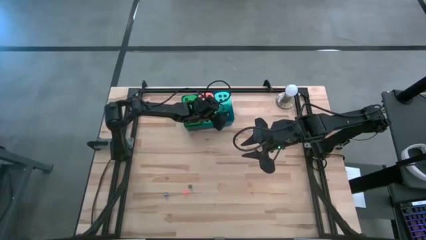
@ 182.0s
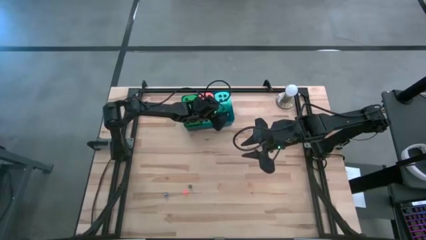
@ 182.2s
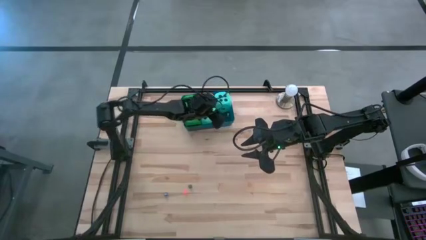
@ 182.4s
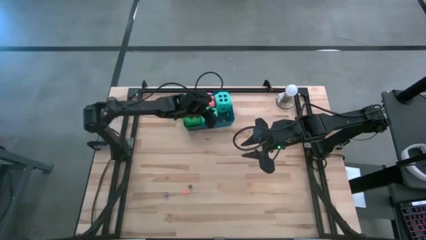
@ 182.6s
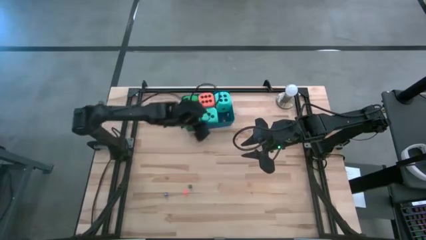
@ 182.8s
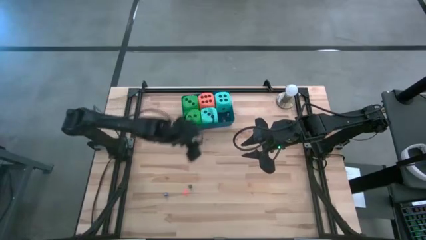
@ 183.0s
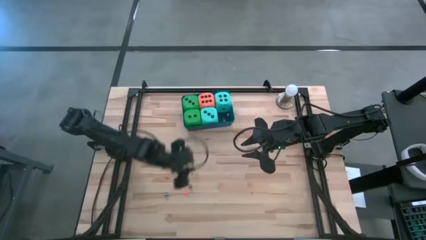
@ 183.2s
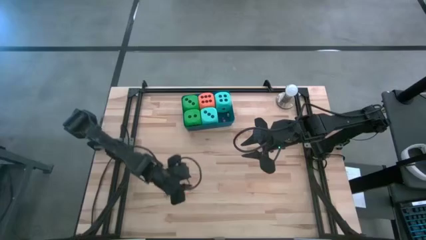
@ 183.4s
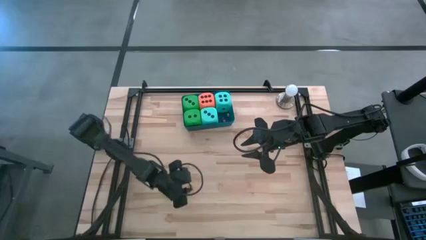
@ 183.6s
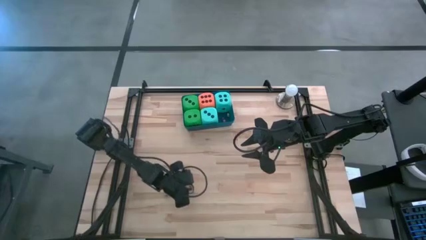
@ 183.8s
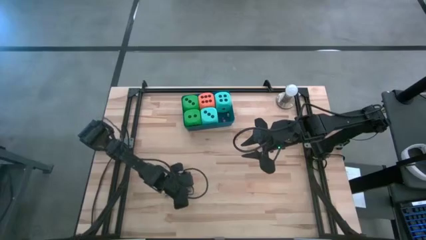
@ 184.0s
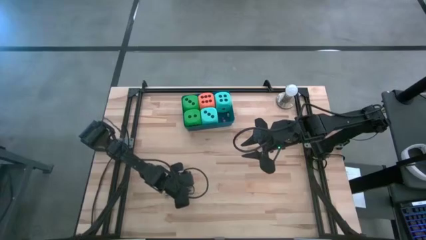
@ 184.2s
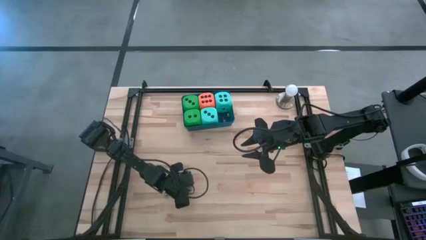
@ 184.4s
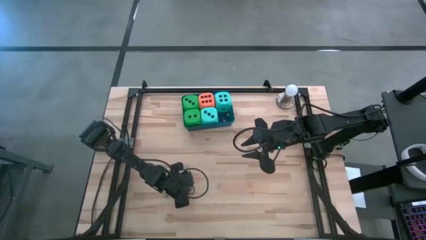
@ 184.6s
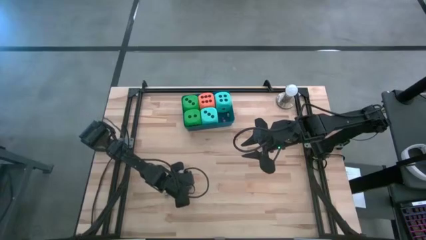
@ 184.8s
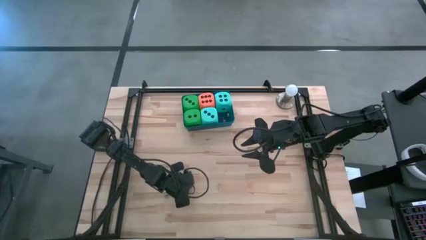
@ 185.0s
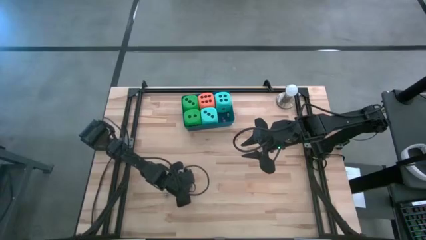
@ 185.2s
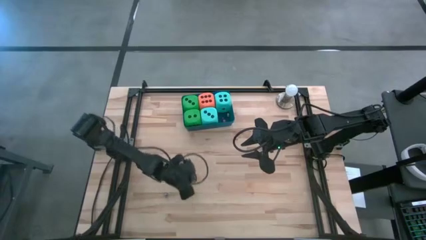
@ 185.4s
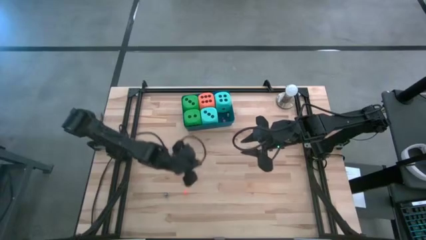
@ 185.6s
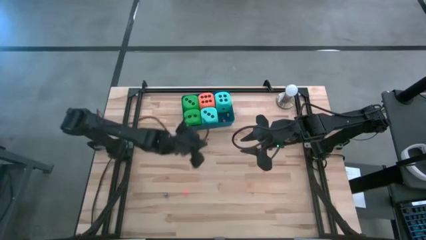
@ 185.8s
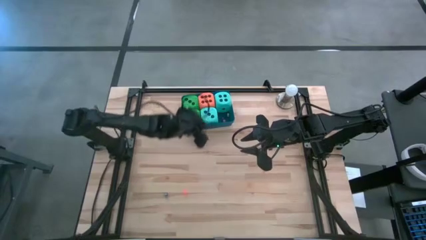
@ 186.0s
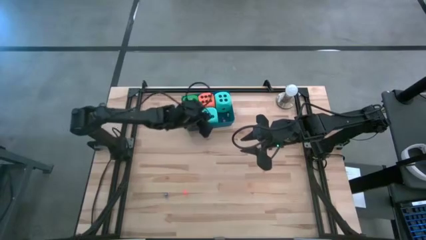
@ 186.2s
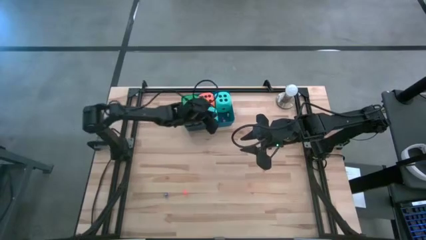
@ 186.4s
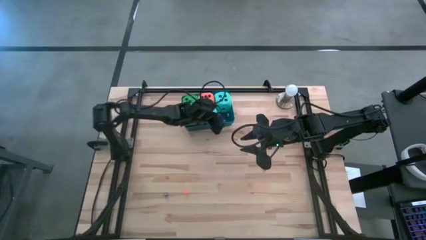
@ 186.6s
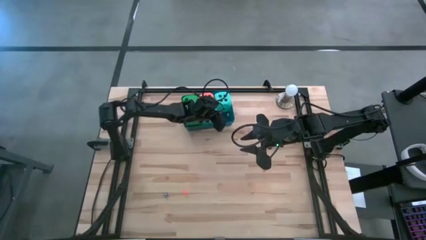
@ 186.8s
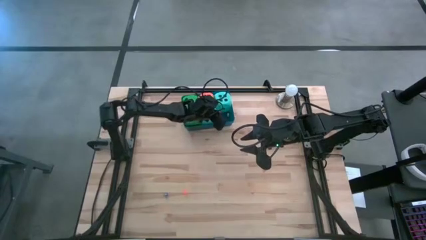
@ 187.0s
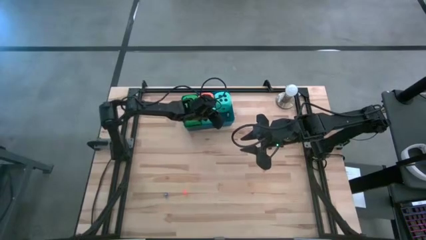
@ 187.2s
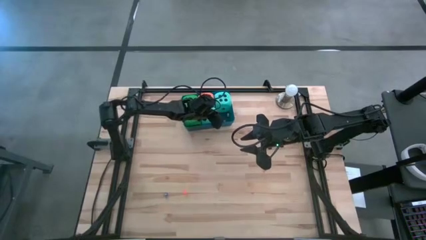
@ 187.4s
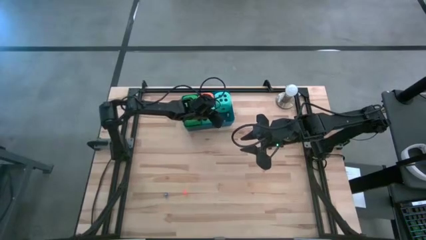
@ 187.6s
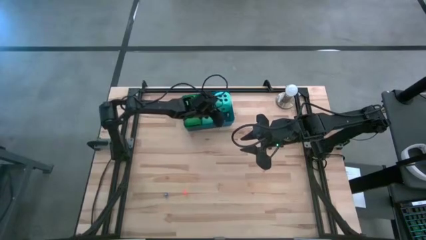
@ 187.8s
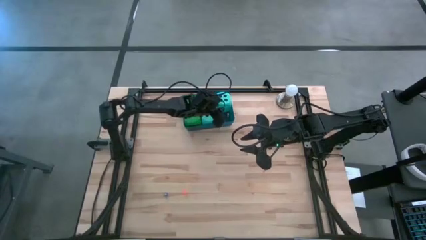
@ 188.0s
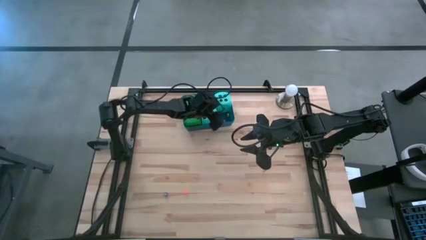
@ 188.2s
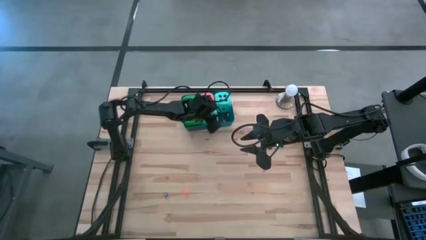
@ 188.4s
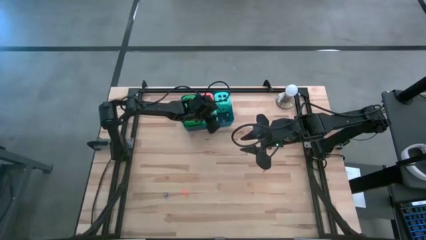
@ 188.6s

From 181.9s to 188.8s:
Task: Pick & Place Dice
Put the small black dice into the blue bin

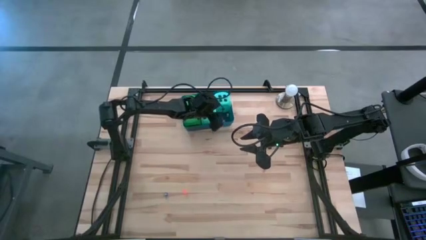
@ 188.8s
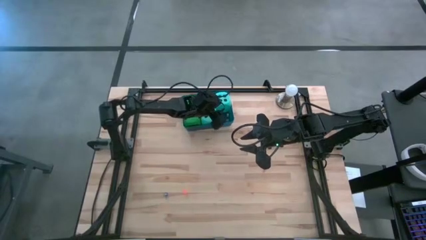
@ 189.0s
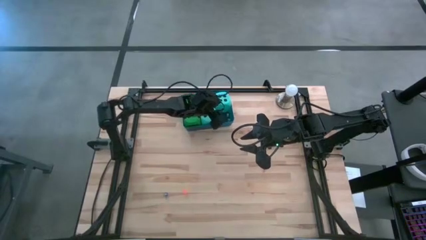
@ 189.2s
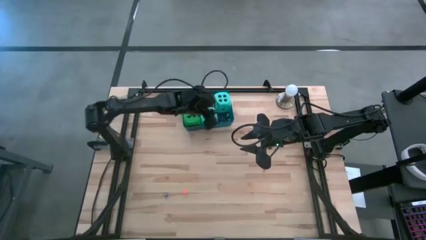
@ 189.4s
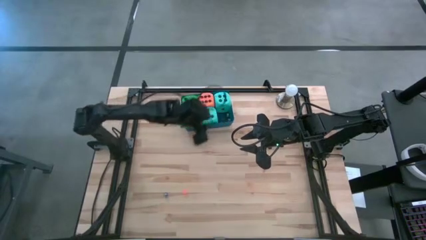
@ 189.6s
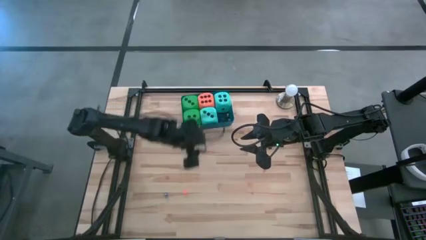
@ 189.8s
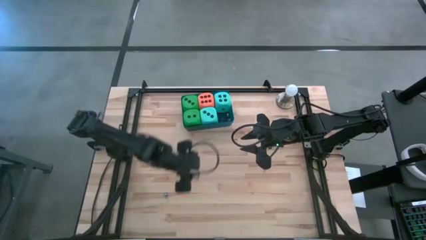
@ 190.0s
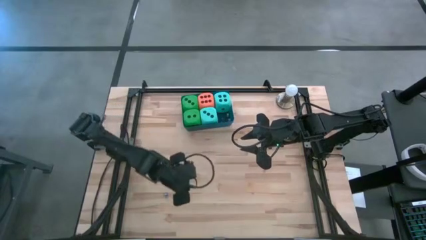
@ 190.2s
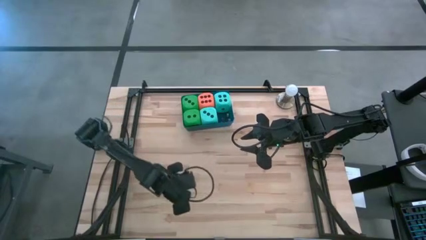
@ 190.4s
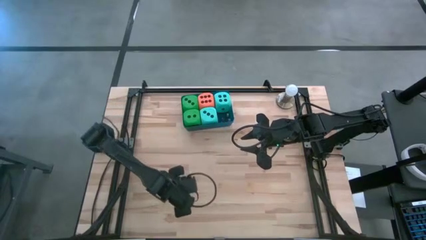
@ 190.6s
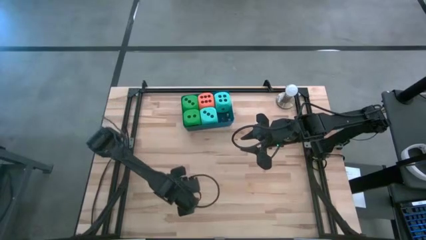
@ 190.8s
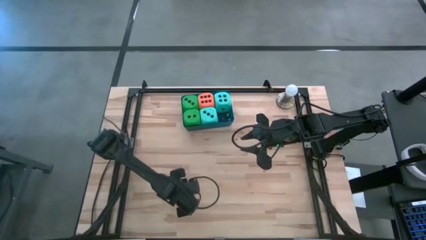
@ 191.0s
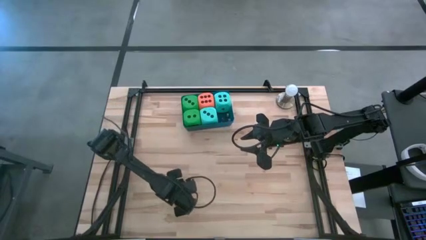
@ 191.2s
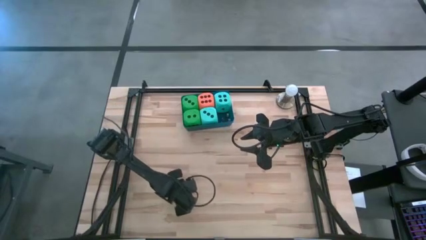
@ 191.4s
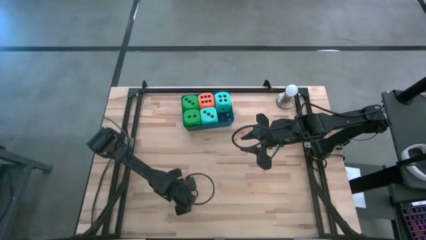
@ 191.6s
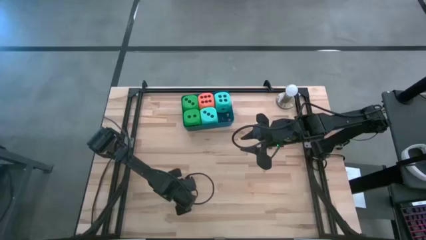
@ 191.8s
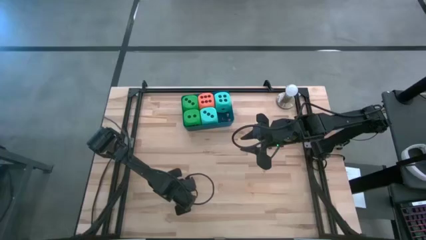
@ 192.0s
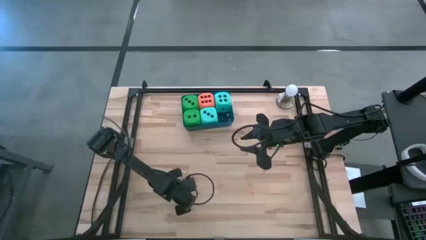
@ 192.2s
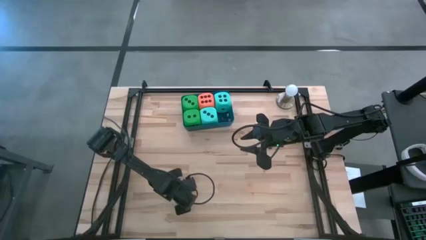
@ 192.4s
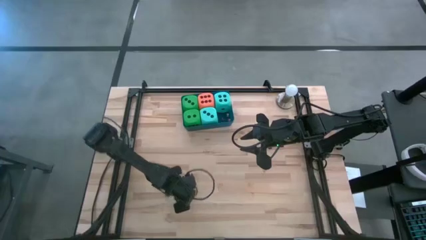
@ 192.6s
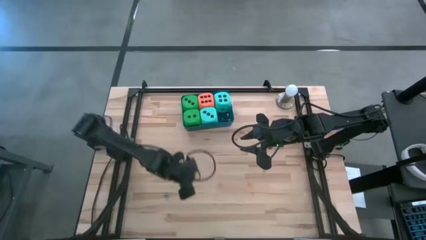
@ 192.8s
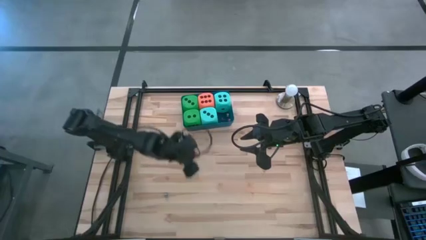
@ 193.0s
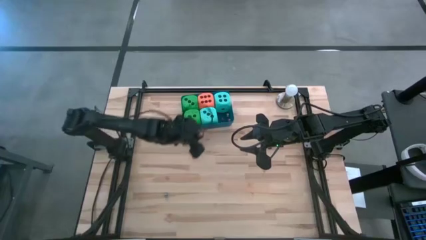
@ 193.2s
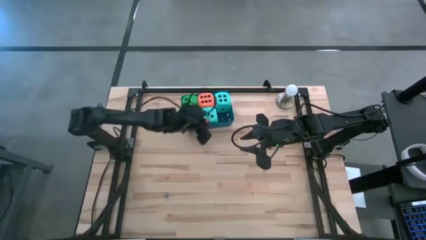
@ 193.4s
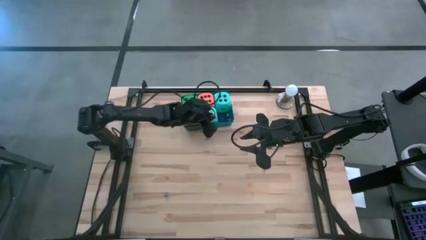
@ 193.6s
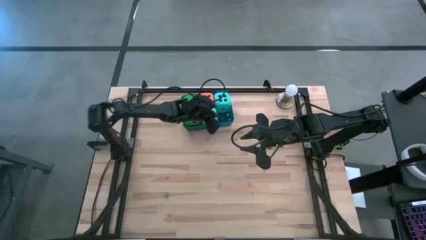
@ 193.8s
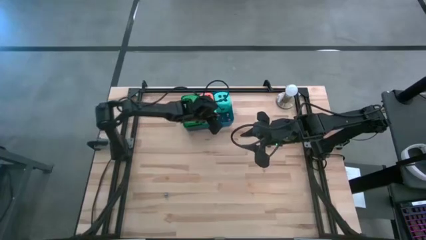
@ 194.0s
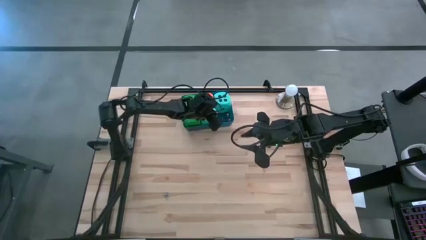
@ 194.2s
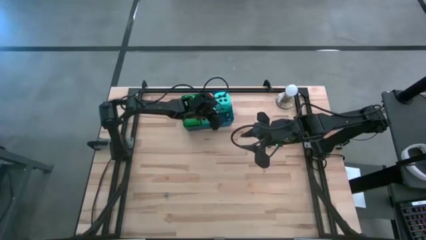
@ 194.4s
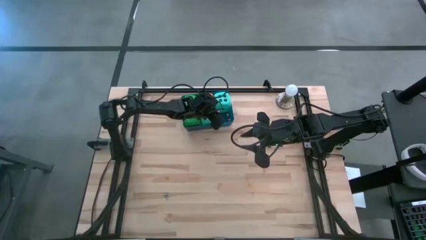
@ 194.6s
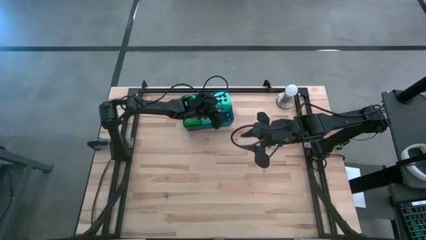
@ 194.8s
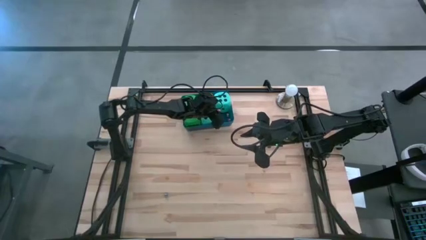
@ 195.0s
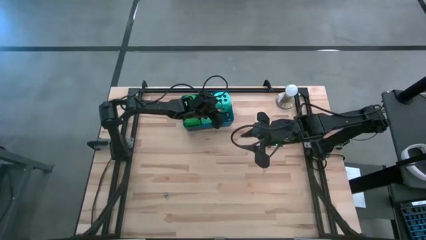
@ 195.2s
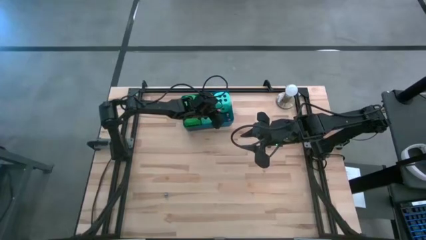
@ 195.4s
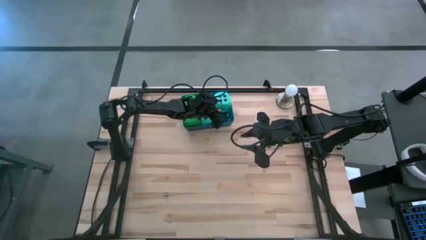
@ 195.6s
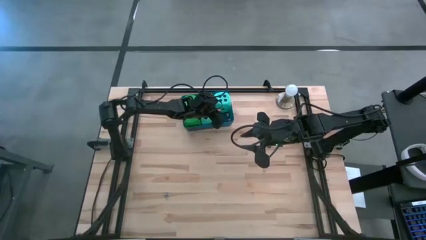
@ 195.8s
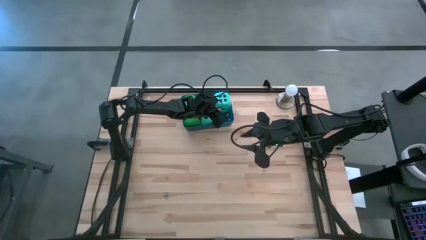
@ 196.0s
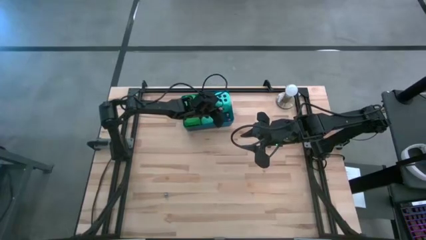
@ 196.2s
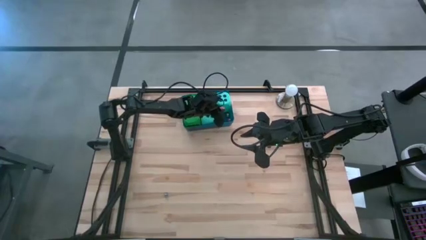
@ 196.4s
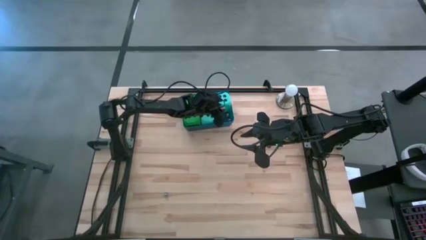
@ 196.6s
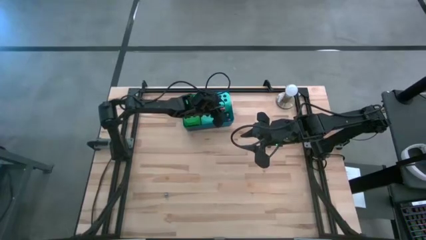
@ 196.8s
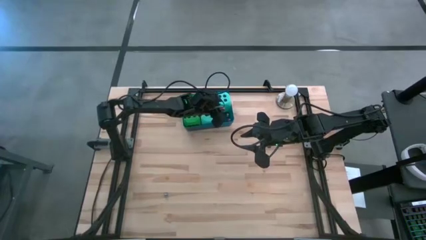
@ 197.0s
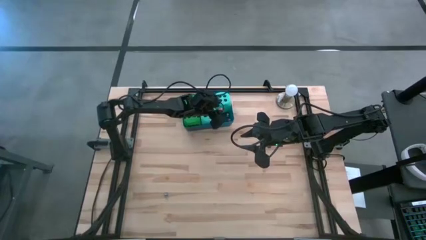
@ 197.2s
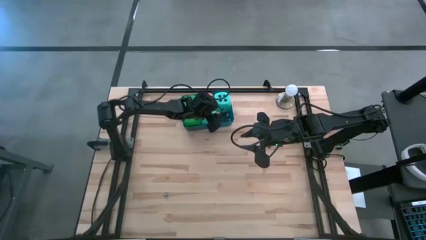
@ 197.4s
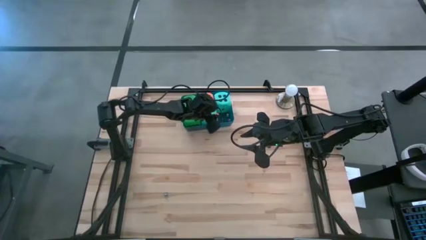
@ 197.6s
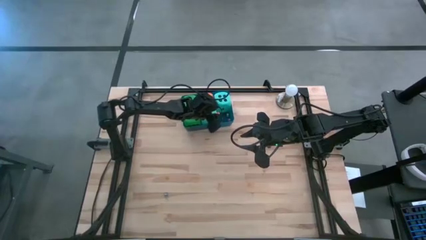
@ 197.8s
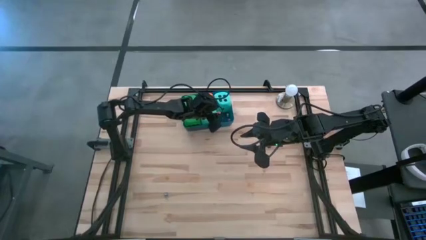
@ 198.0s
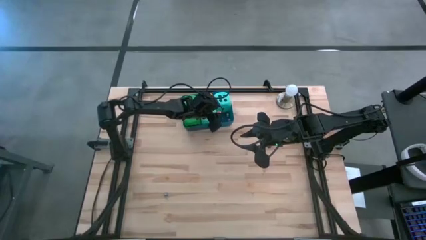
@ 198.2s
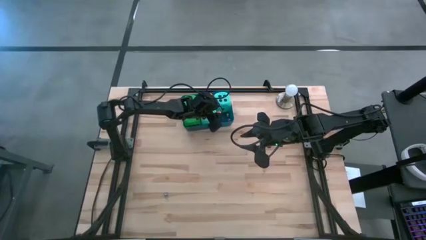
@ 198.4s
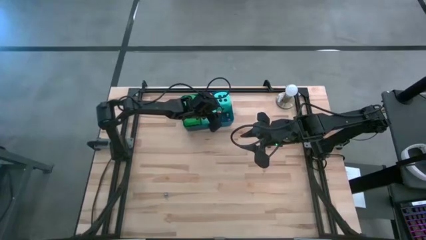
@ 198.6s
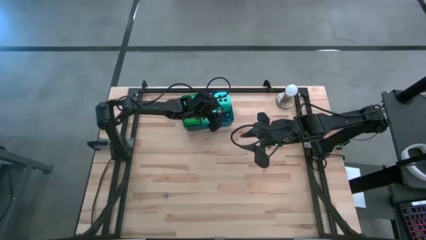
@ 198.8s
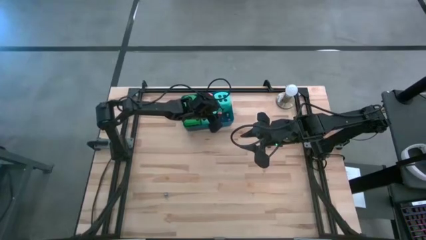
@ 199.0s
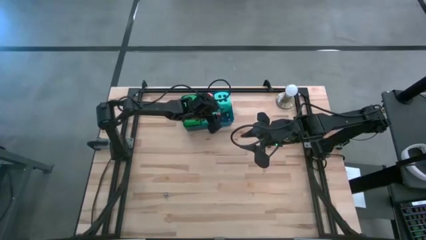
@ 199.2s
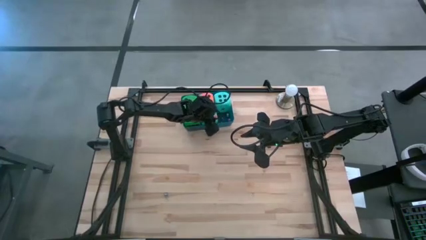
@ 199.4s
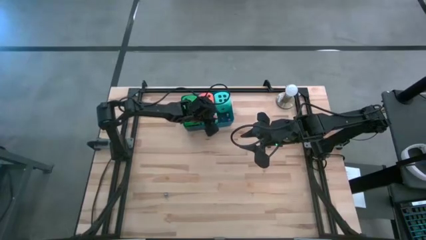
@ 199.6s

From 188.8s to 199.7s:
Put the small orange dice into the blue bin
